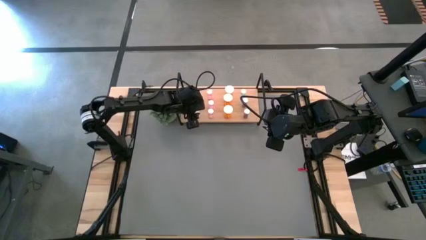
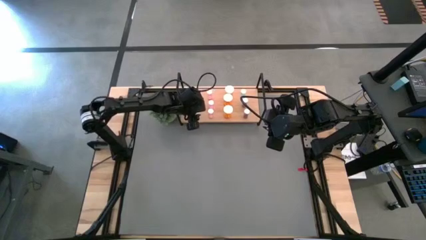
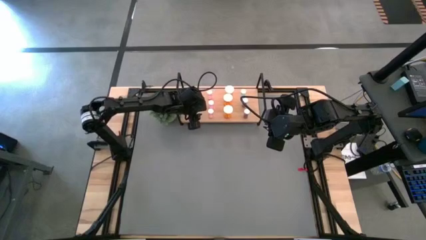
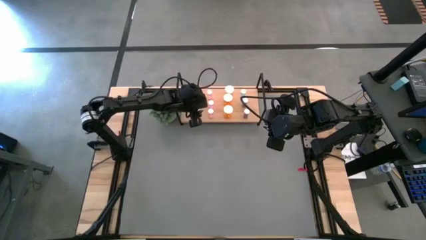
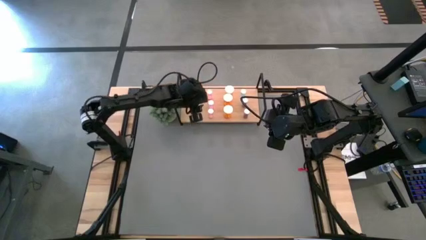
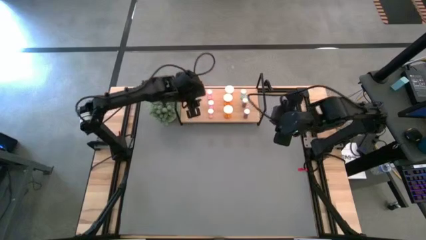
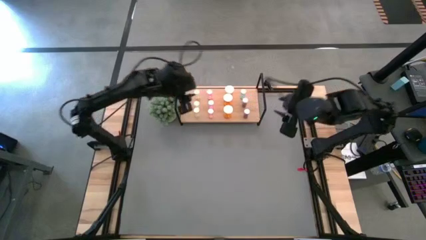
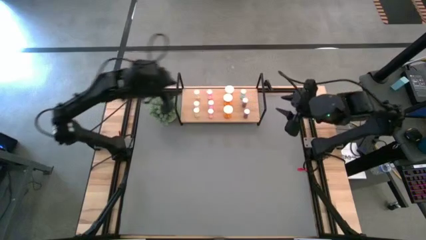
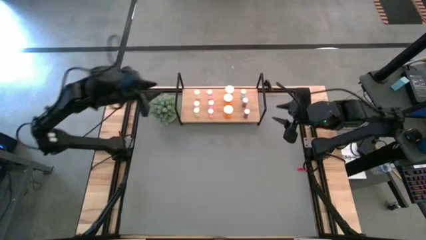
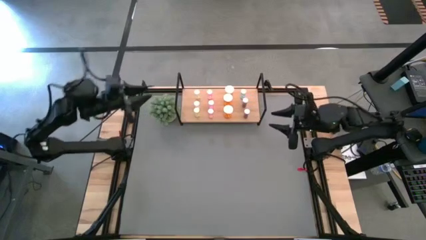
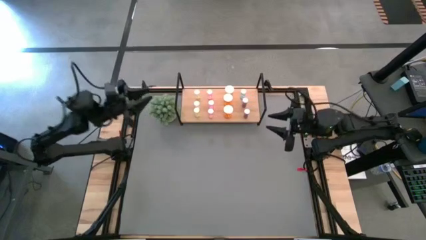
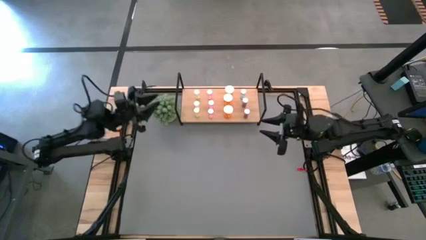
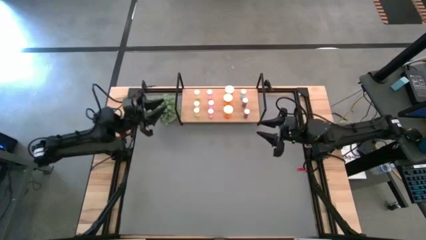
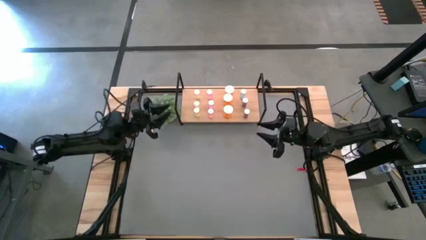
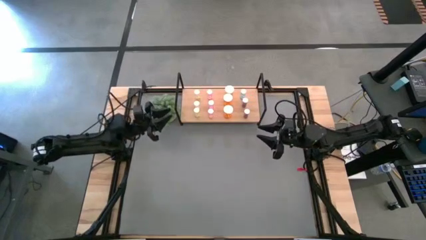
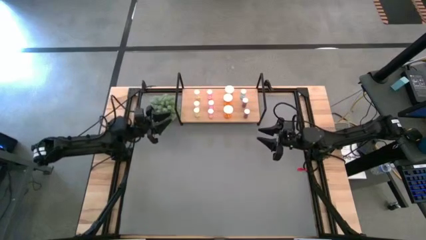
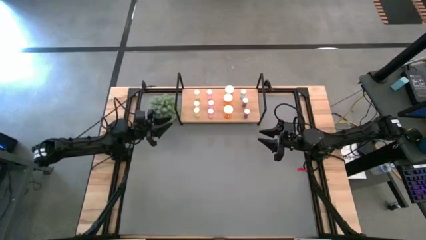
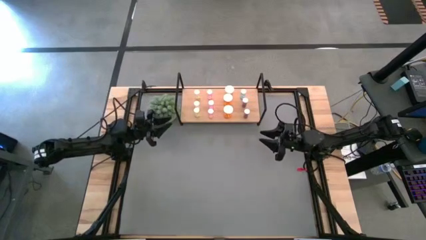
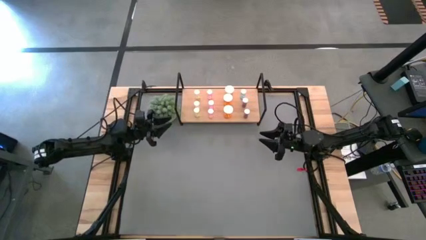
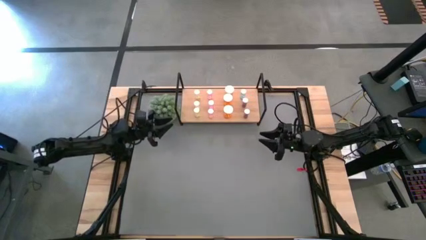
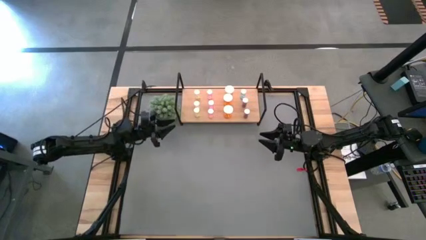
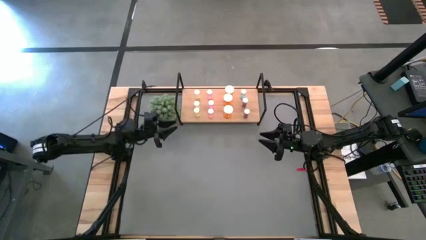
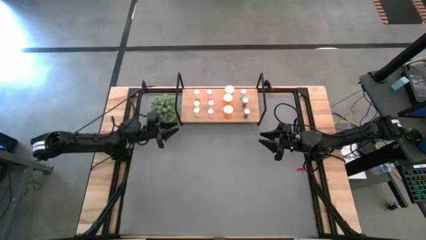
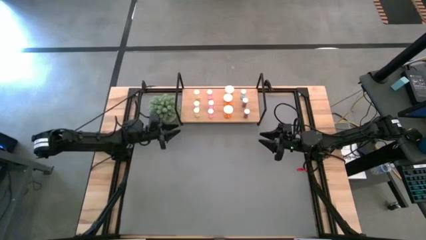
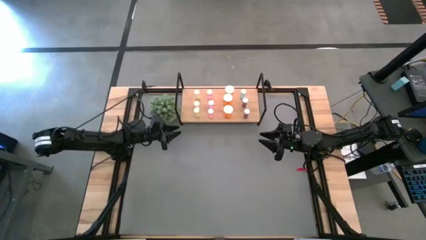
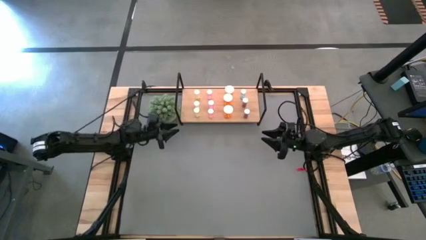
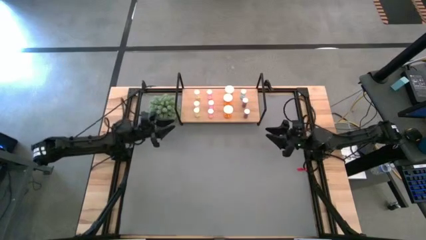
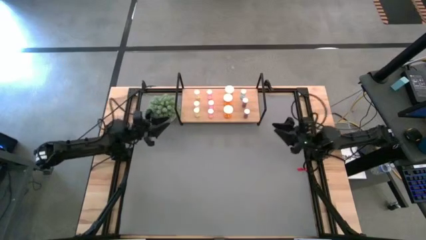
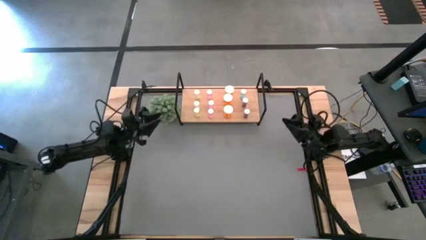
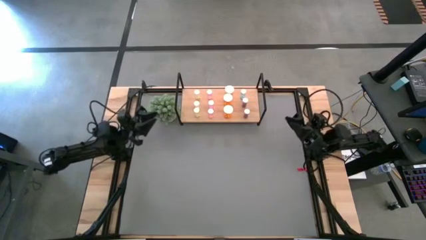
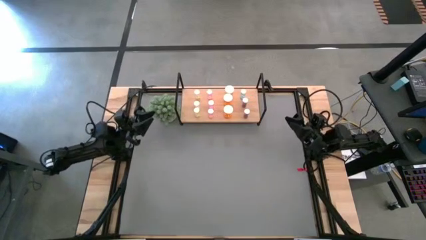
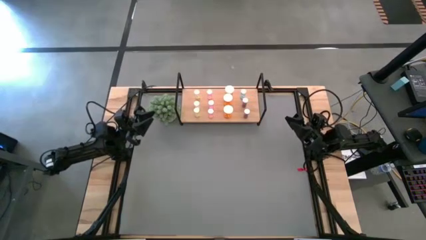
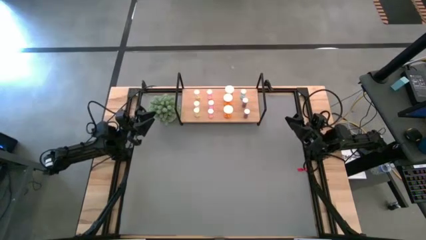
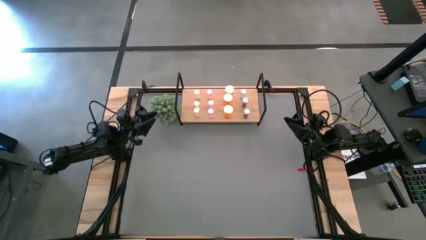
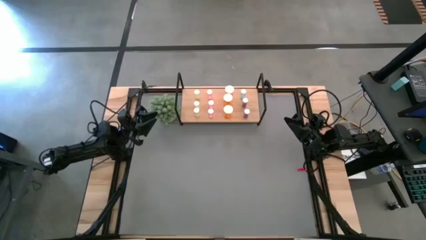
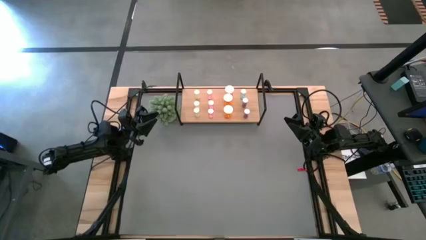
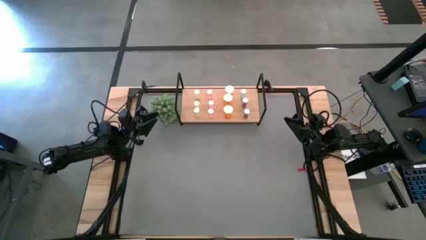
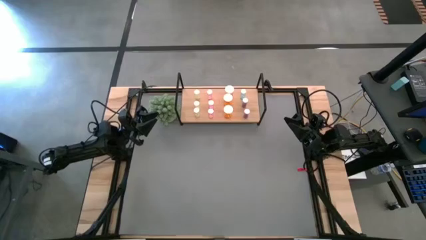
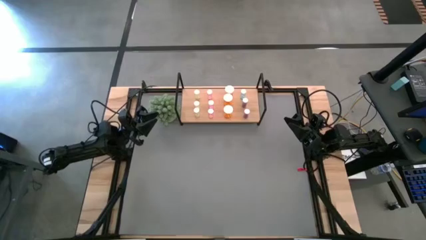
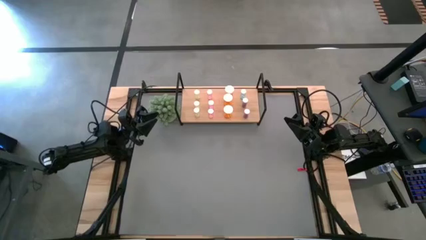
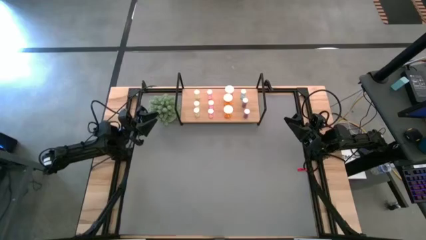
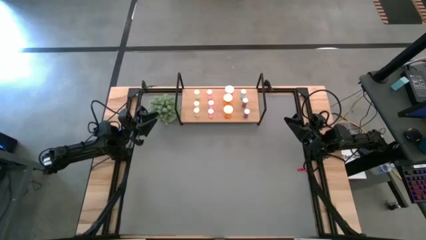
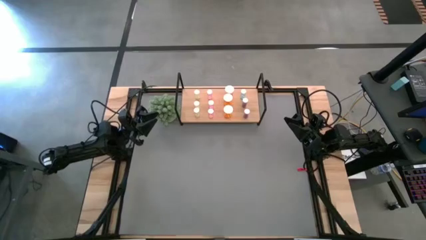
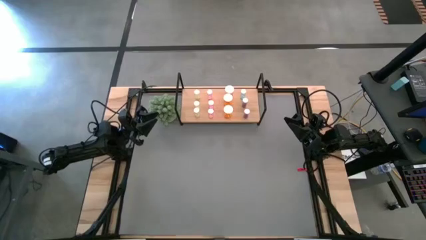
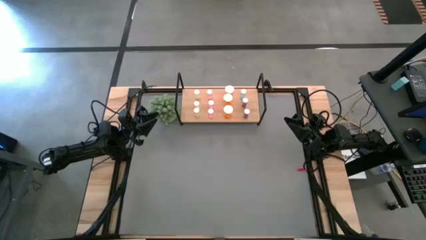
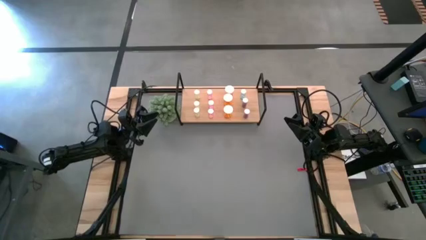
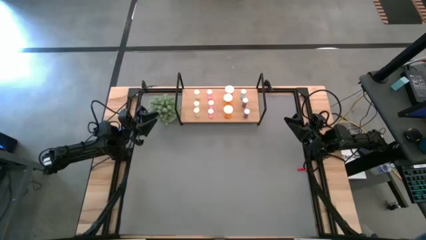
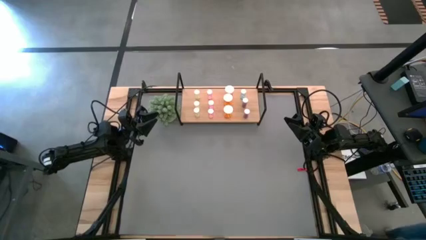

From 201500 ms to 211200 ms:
Task: Pick and place medicine bottles onto shelf by color
Return to Home Position

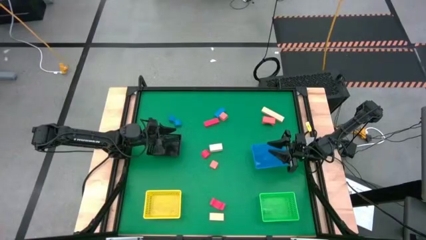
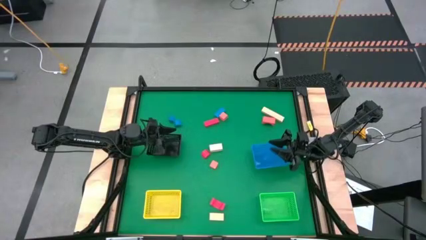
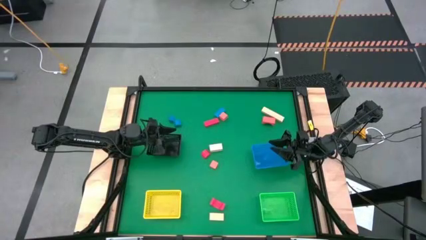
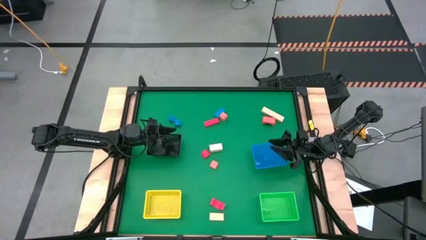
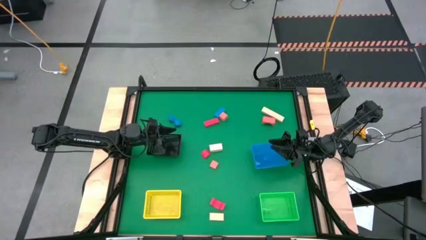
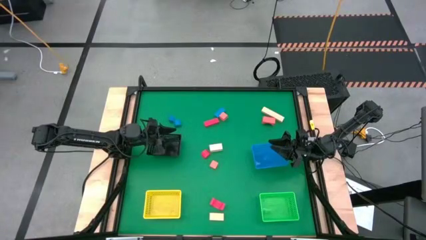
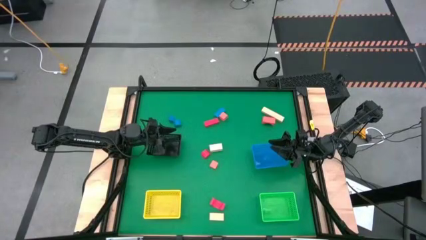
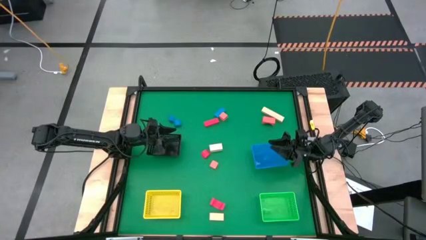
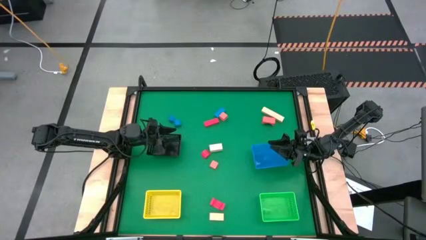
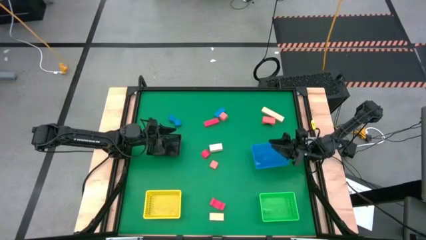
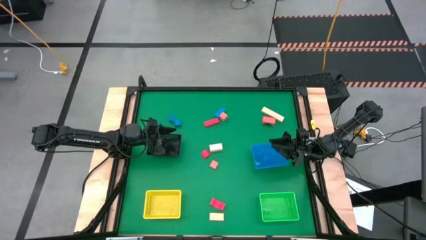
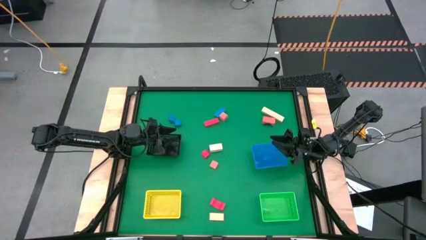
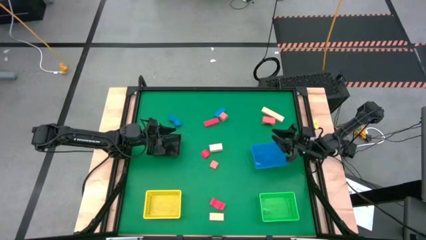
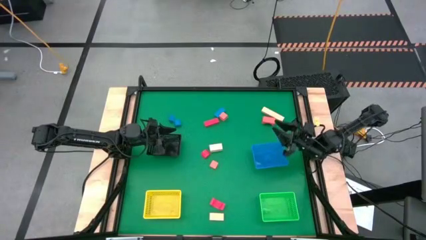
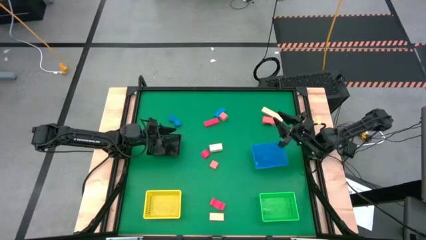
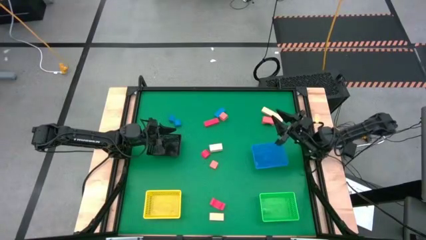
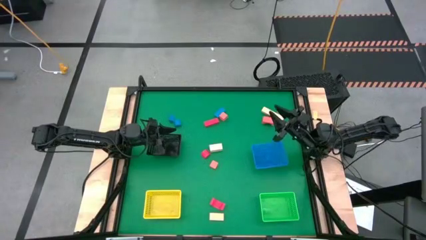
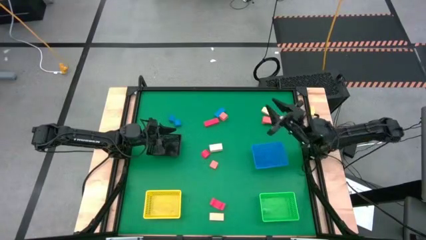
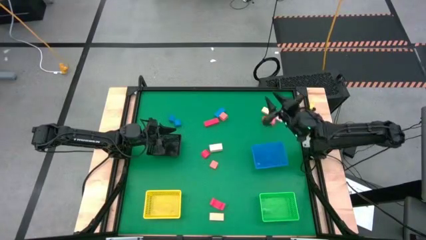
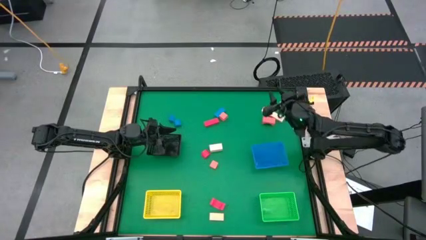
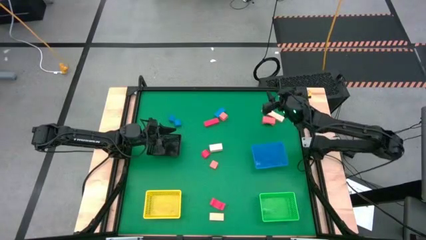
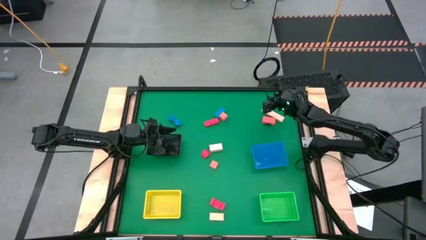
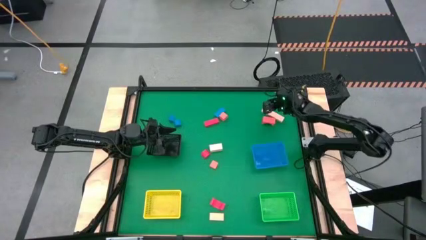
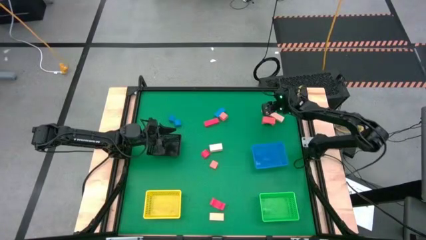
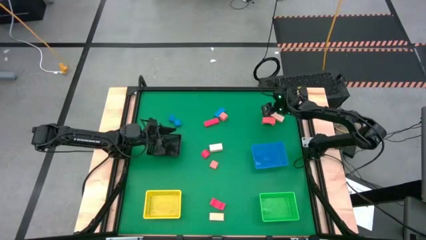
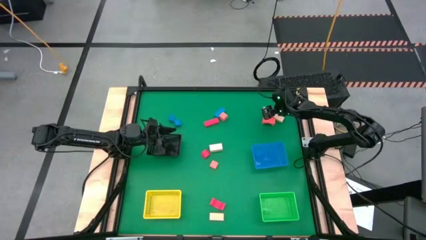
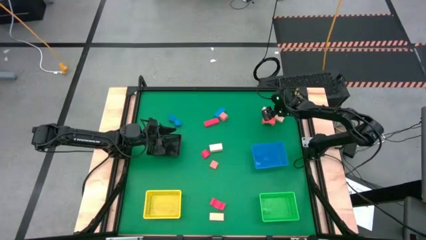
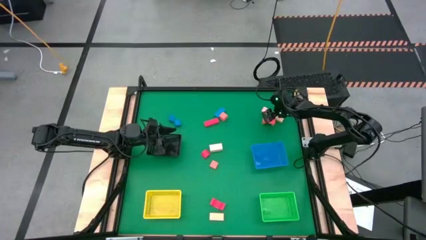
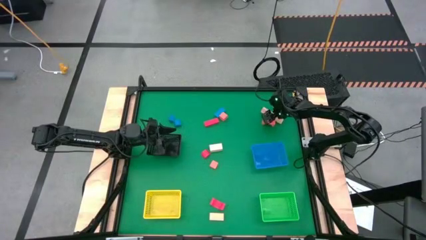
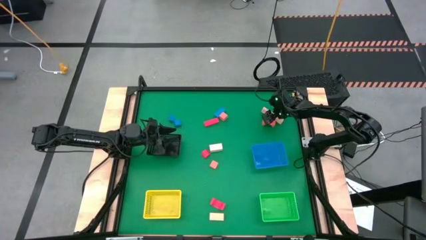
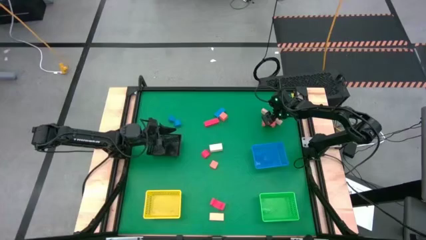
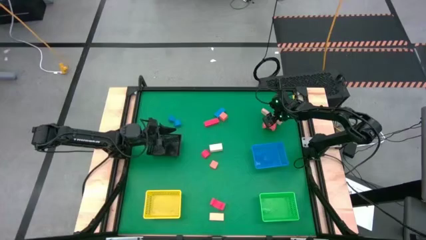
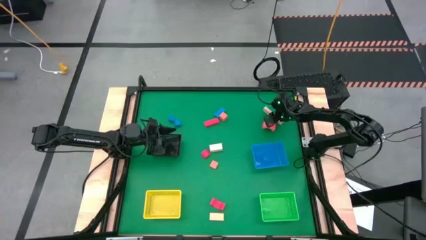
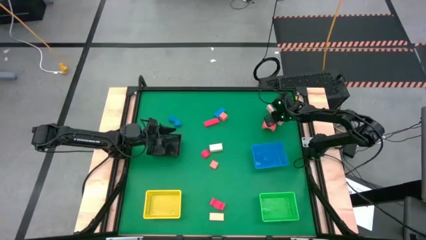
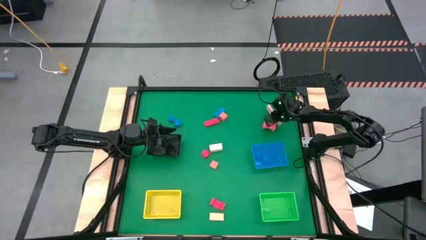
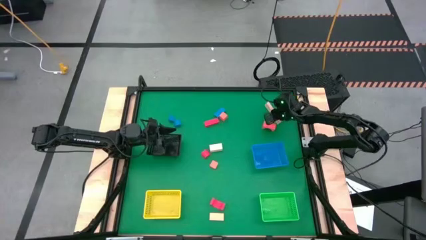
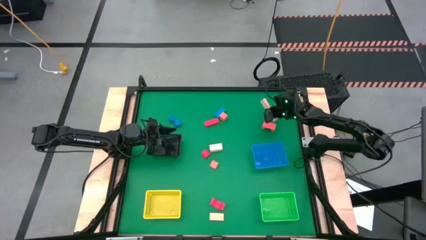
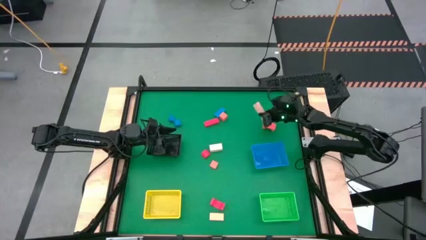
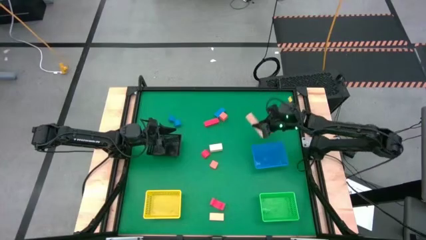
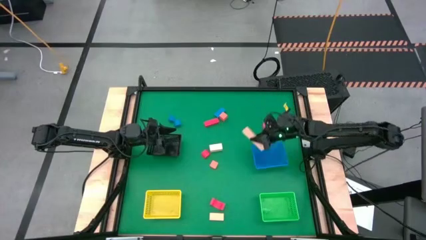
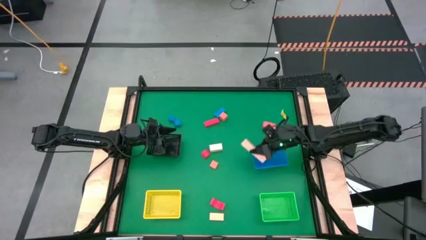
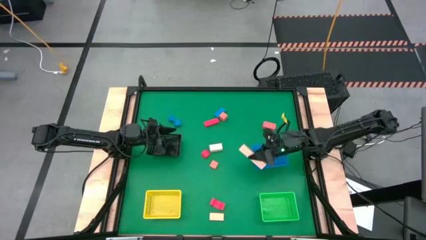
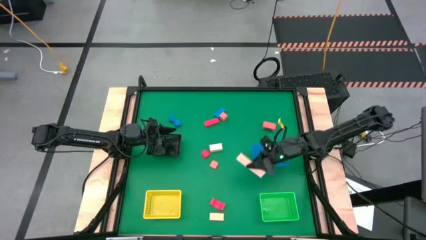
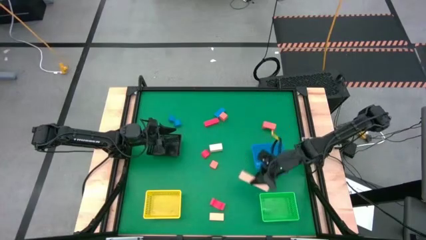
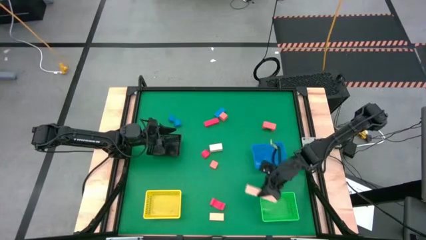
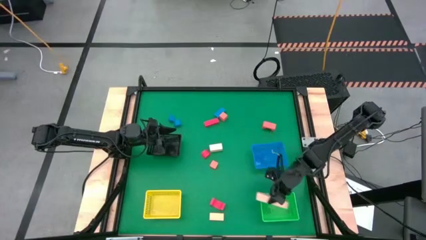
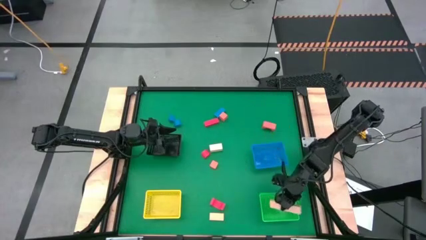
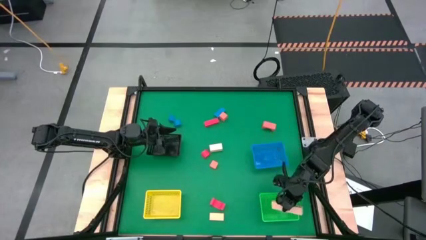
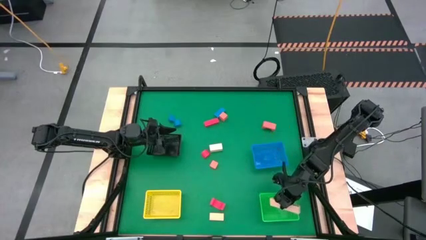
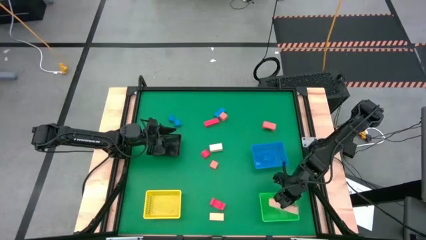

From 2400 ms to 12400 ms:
Task: Sort & place blocks by color
Put the top brown block into the green bin
